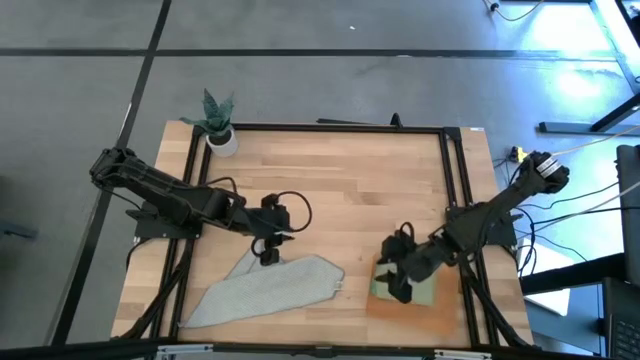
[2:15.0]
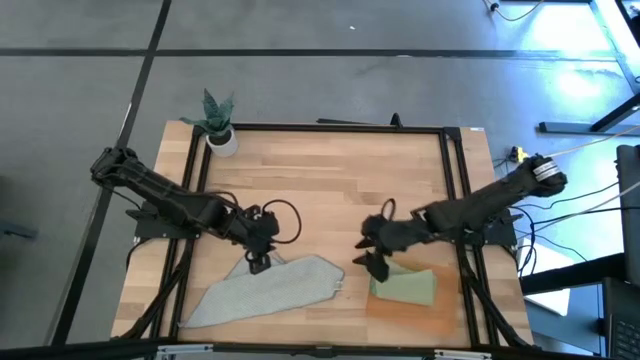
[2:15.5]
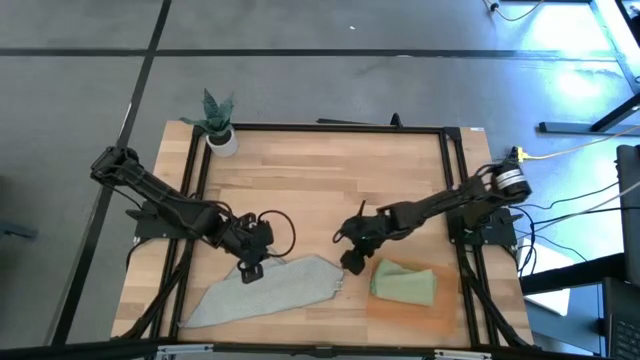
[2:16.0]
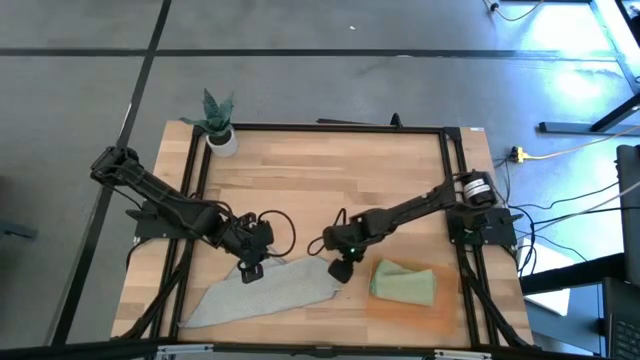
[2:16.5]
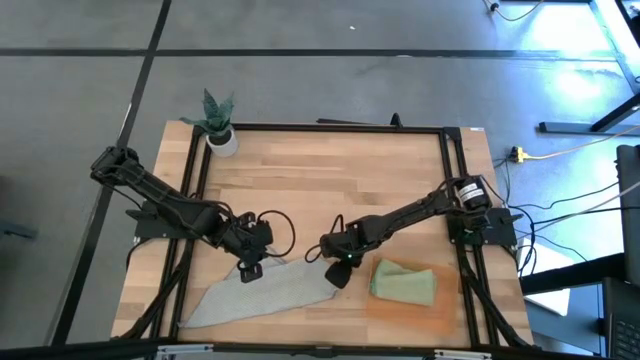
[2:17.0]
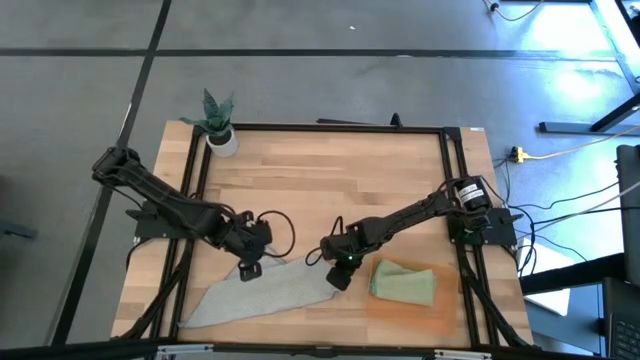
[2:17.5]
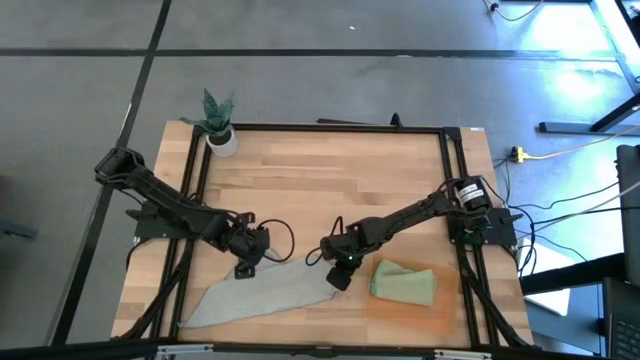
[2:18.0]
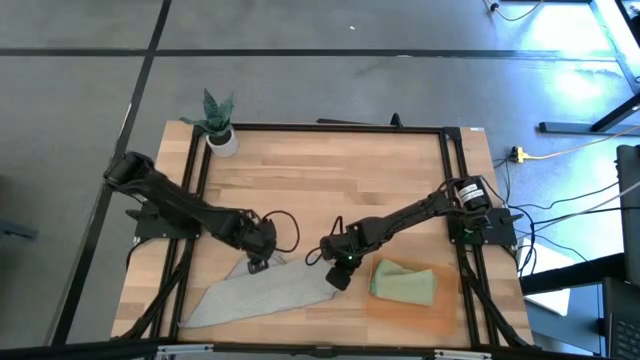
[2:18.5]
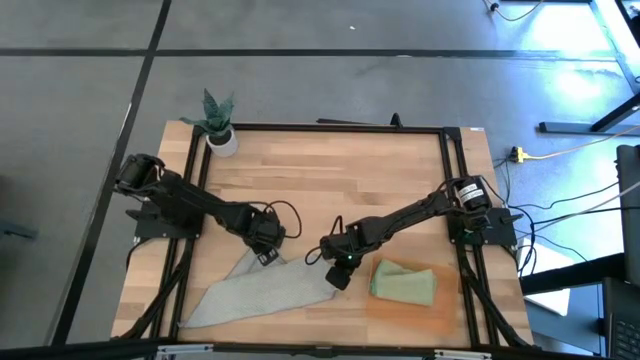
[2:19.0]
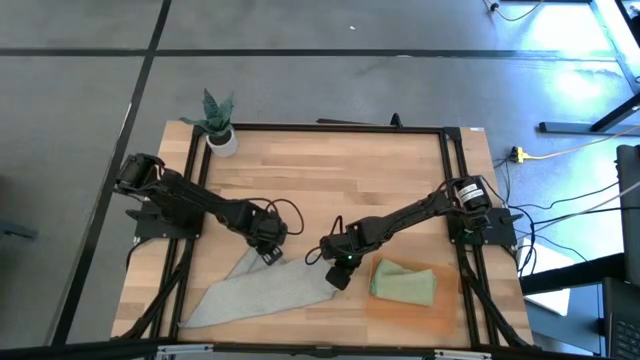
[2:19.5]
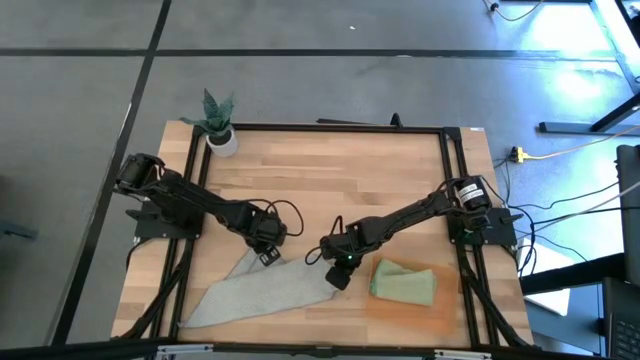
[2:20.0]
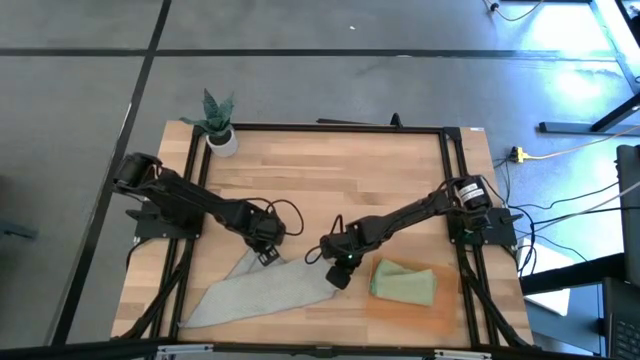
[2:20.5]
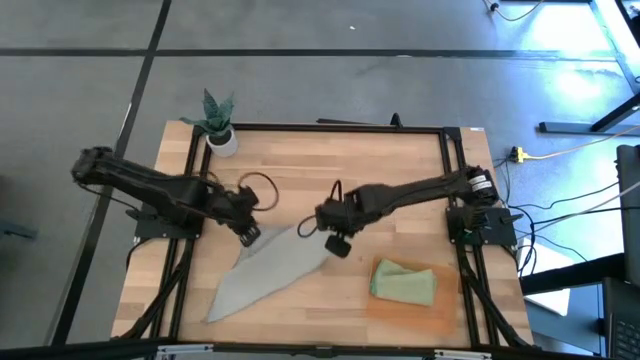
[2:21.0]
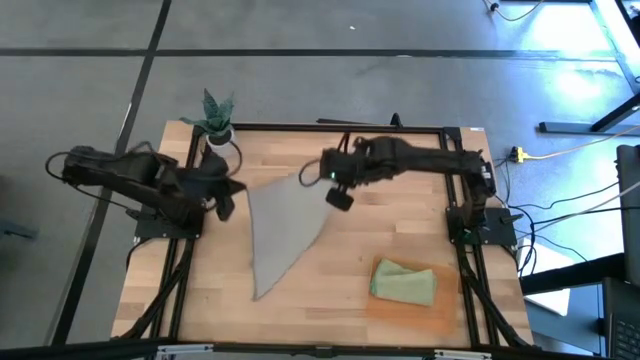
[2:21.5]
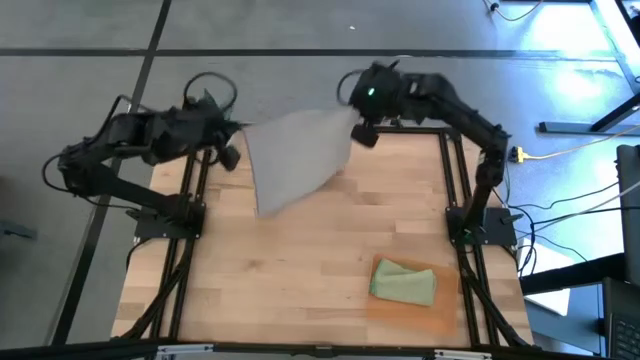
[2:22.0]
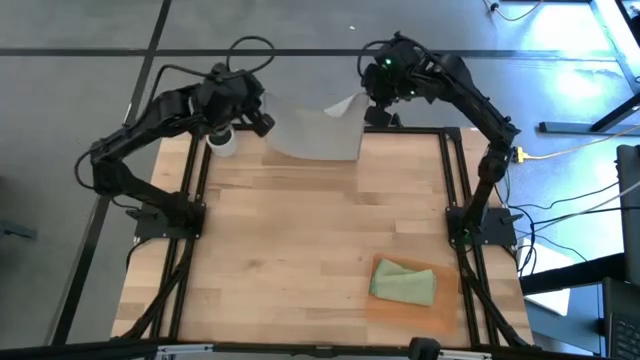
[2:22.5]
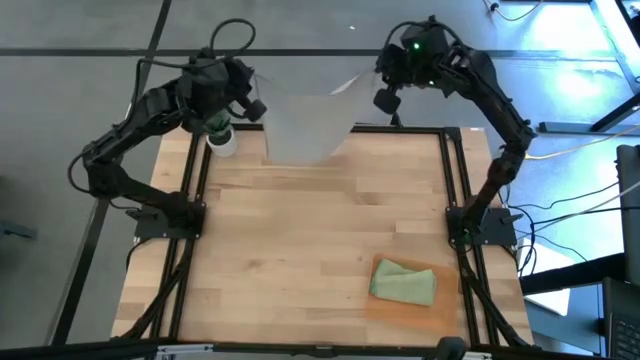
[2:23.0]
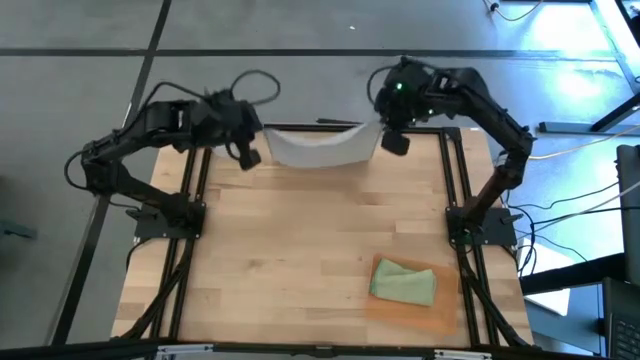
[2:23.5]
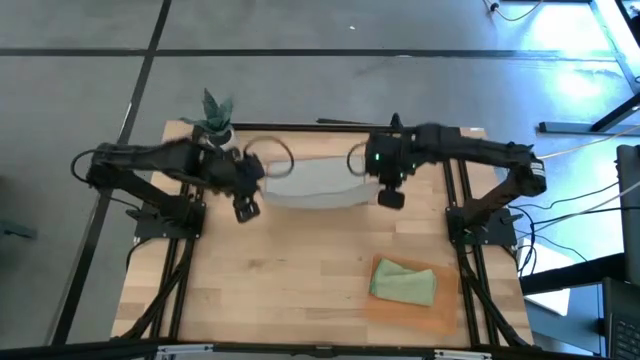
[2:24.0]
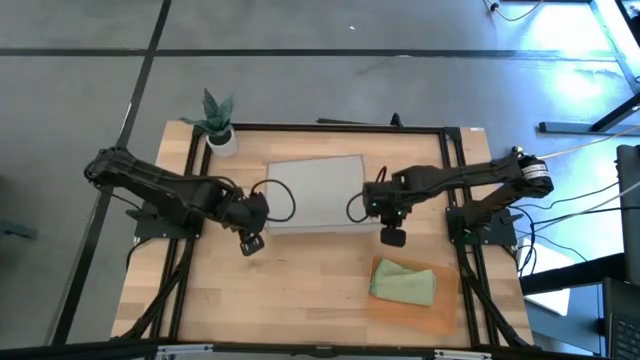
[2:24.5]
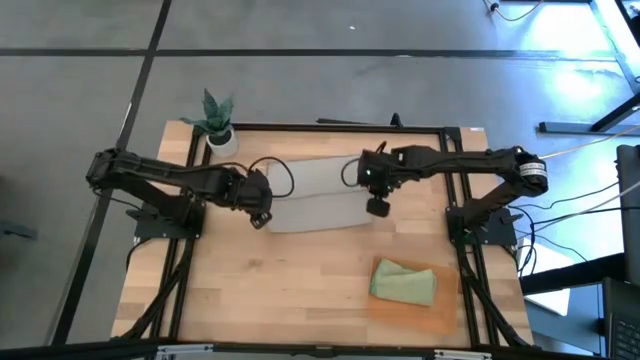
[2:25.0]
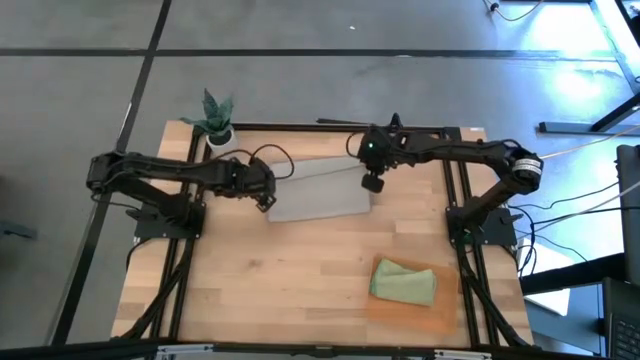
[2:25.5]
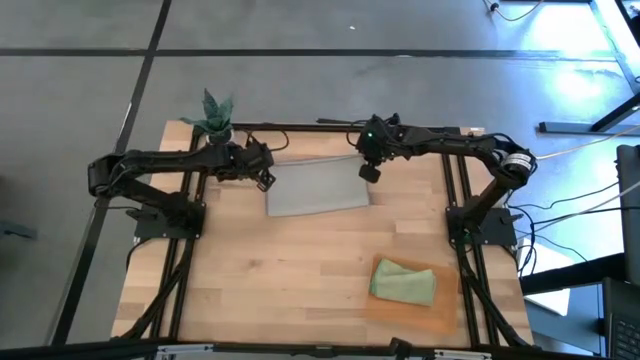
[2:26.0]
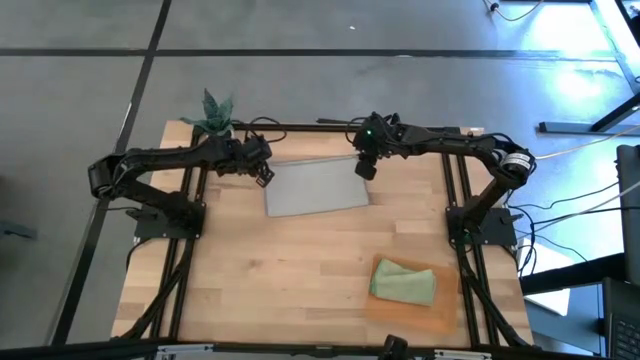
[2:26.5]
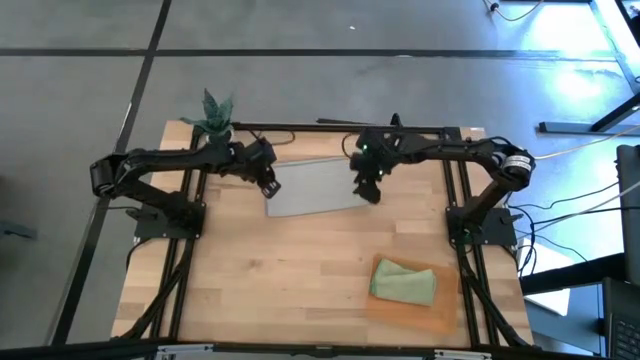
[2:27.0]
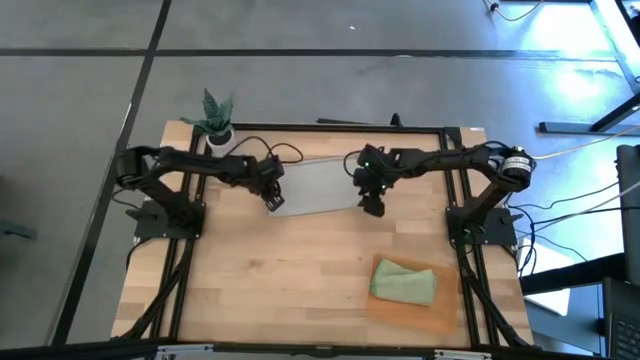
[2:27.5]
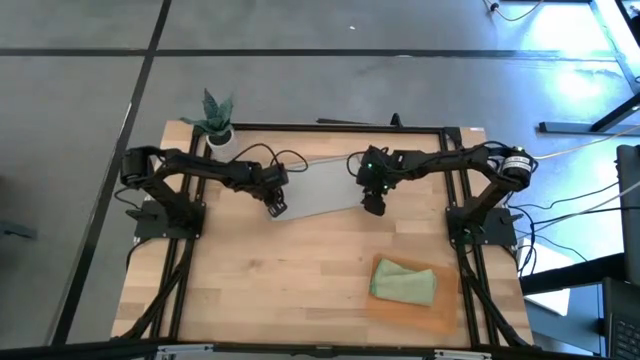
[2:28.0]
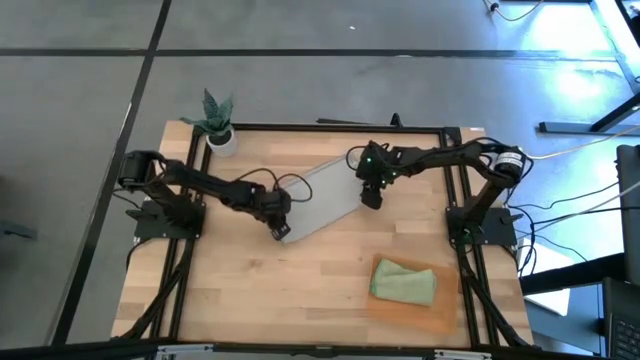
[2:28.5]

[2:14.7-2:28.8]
Task: Roll microfiber towels into tight, uniform cylinder then place into a basket
Roll the gray microfiber towel

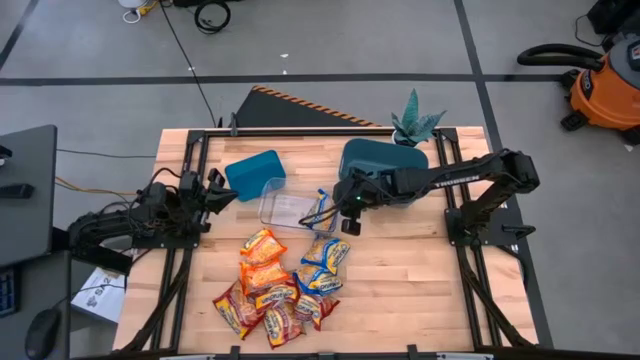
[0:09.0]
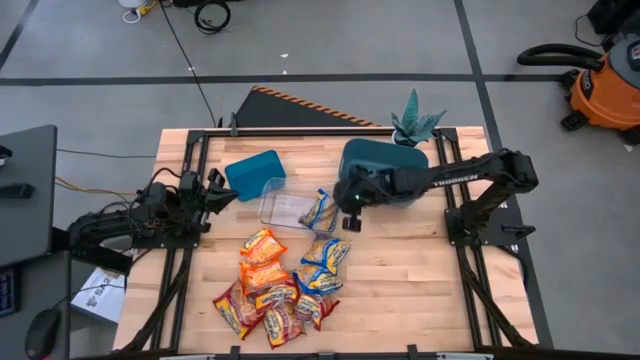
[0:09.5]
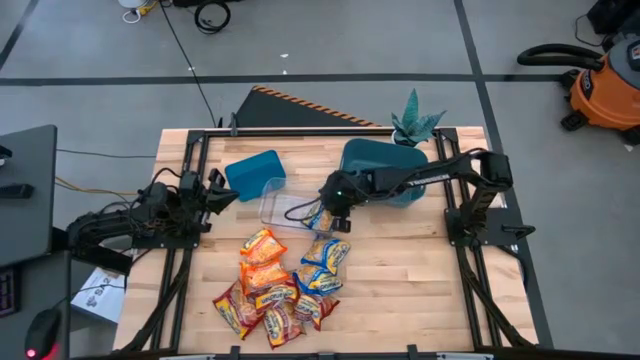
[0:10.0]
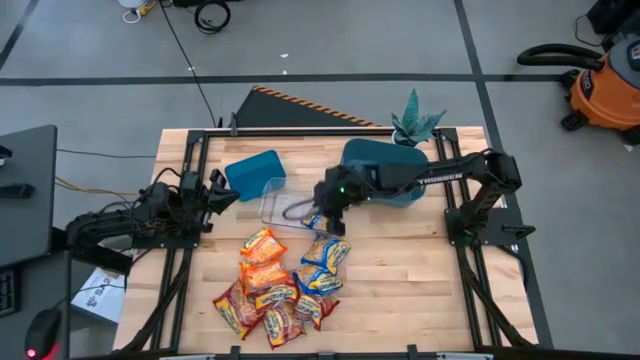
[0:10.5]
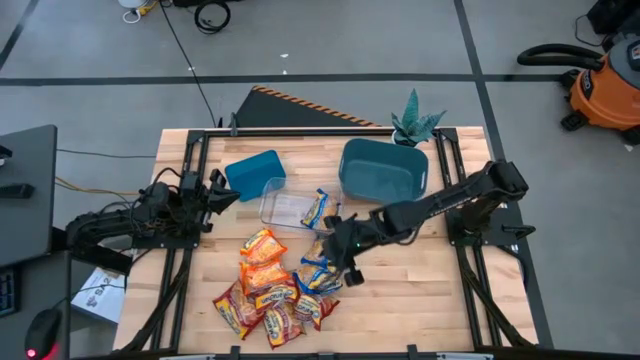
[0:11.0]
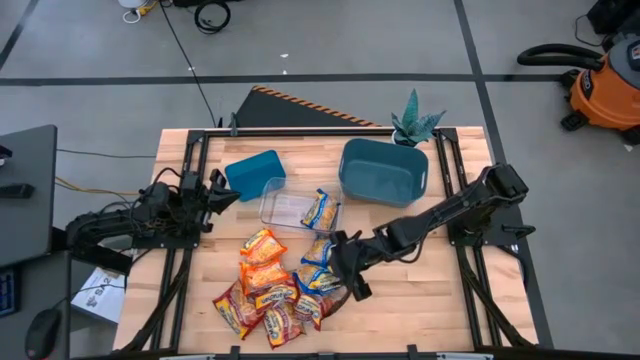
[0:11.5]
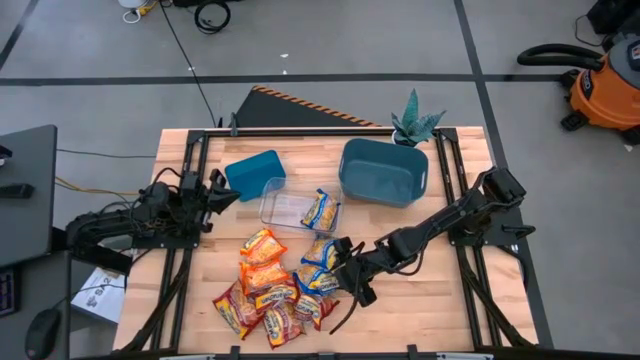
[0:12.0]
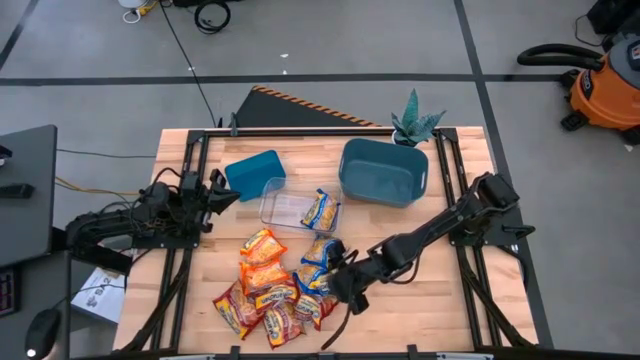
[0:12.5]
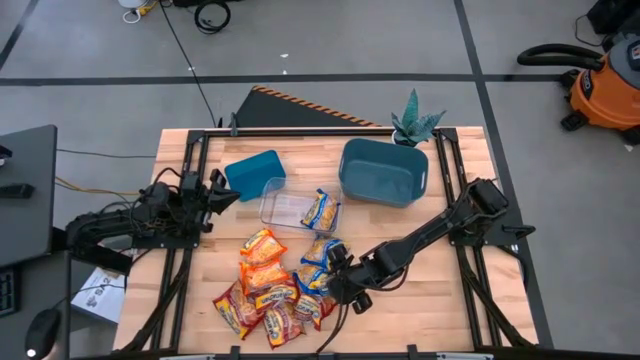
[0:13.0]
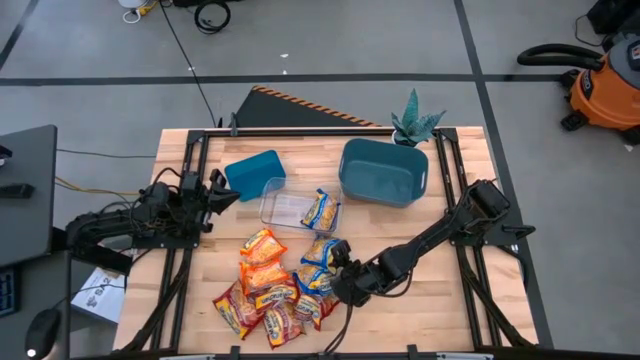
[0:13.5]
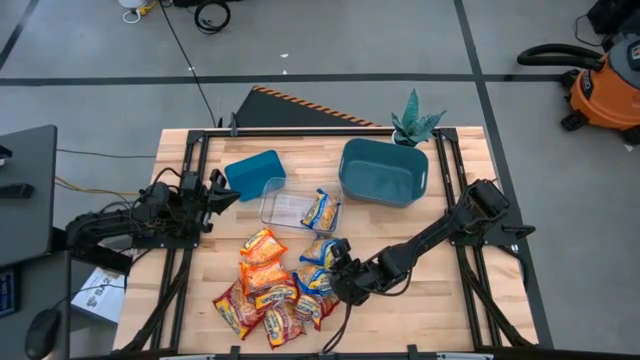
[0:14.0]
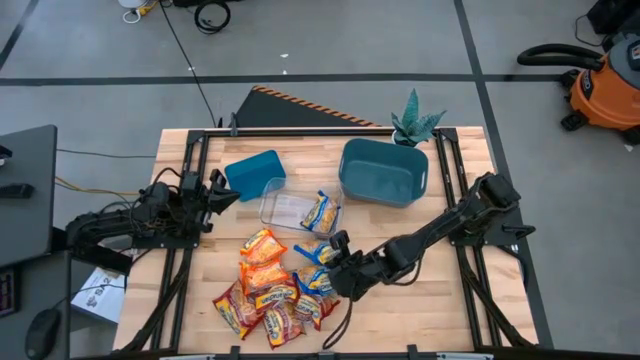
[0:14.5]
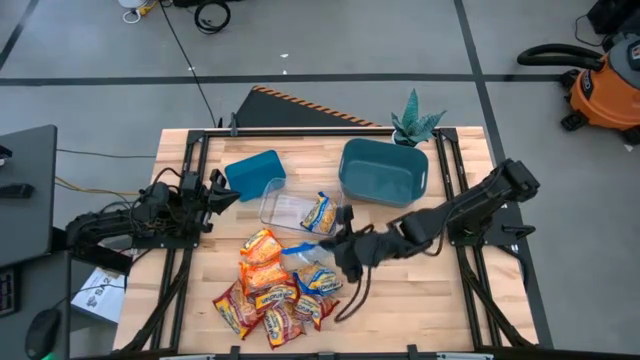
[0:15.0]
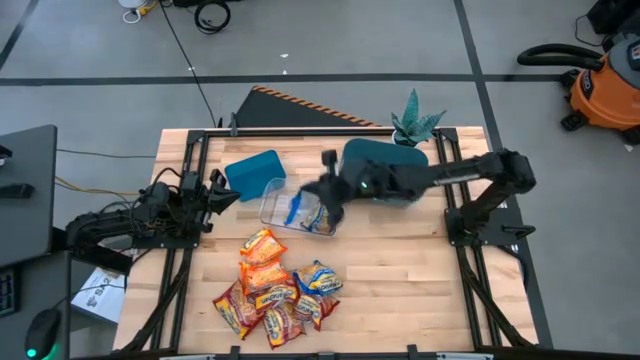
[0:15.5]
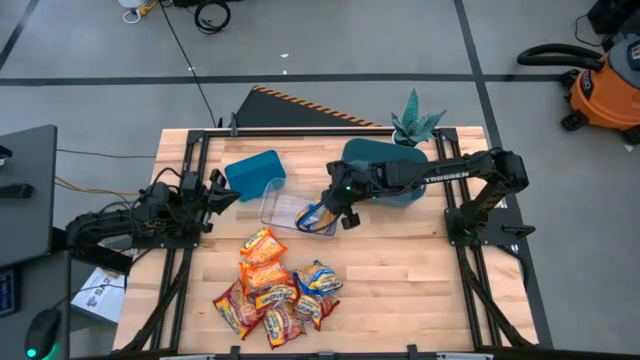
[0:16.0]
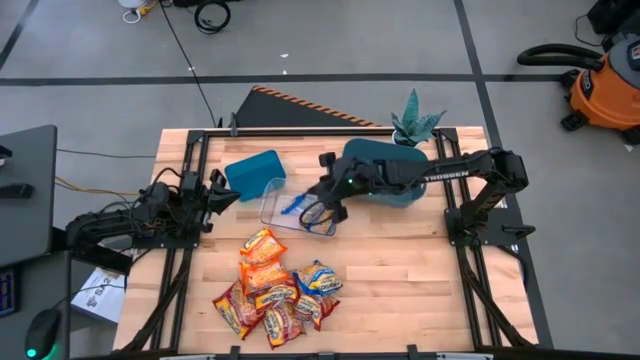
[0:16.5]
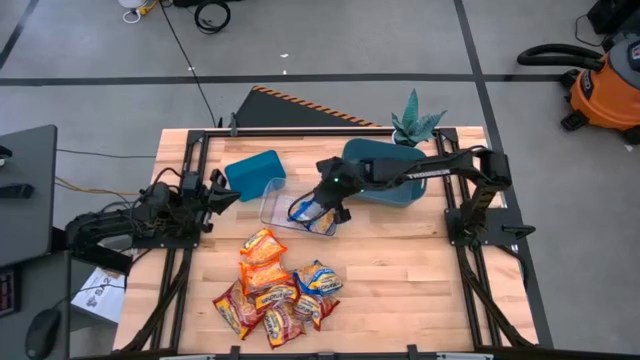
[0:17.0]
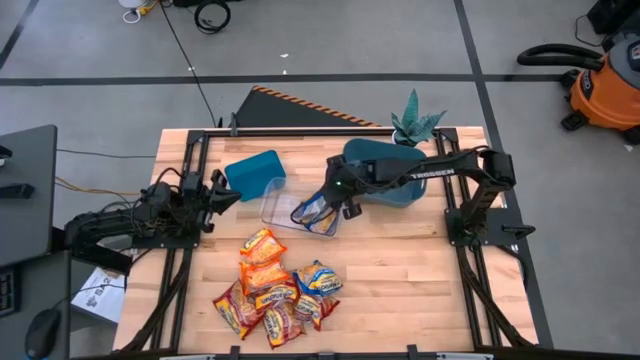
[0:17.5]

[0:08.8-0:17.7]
Task: Sort Maruchan noodles
Put the blue noodle pack into the center transparent bin
